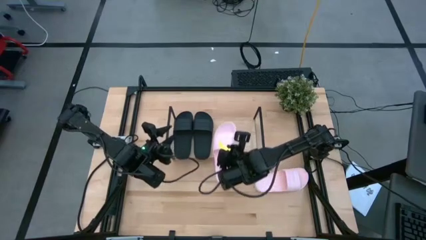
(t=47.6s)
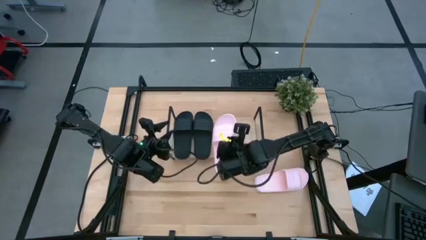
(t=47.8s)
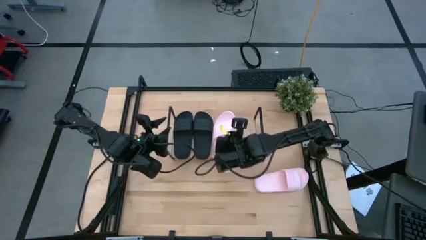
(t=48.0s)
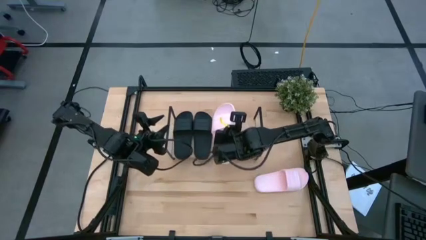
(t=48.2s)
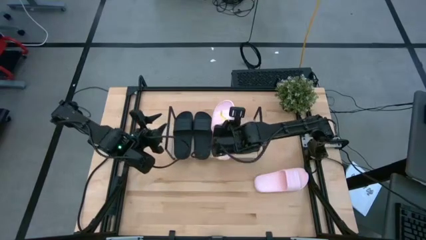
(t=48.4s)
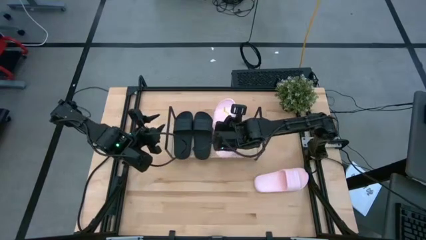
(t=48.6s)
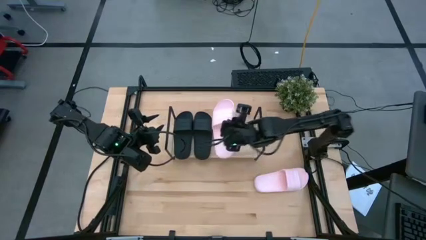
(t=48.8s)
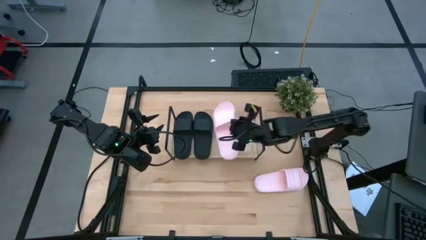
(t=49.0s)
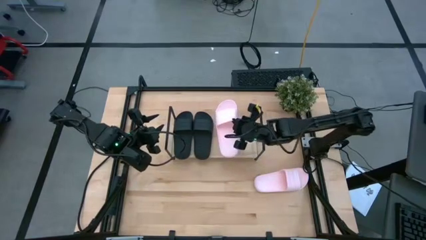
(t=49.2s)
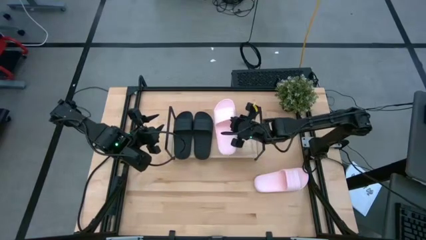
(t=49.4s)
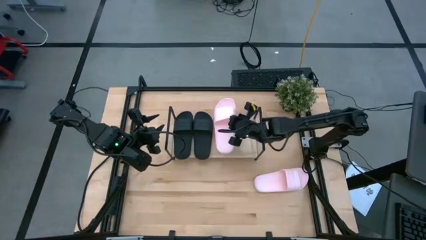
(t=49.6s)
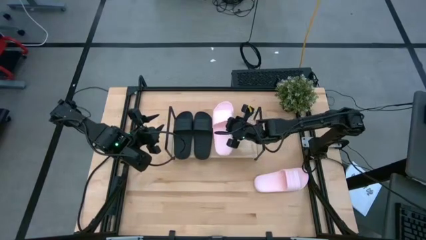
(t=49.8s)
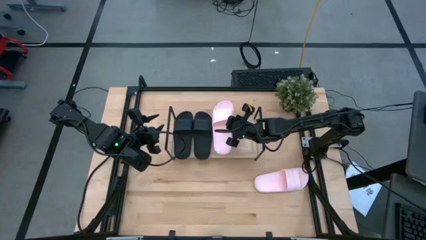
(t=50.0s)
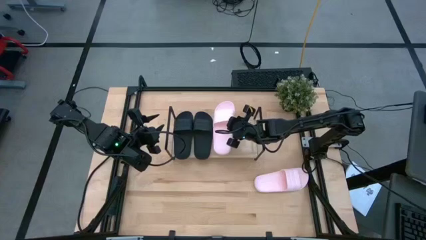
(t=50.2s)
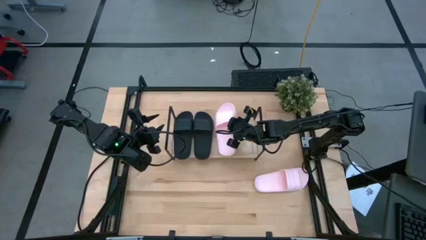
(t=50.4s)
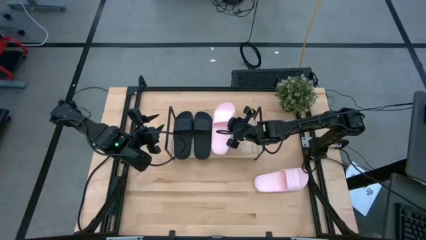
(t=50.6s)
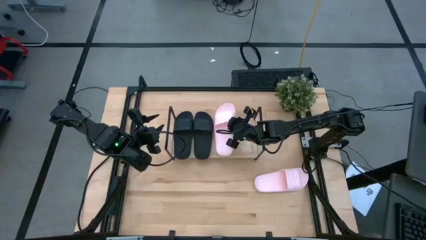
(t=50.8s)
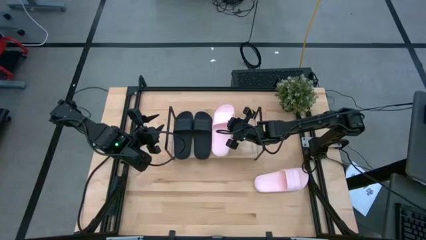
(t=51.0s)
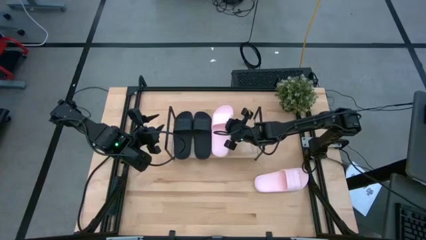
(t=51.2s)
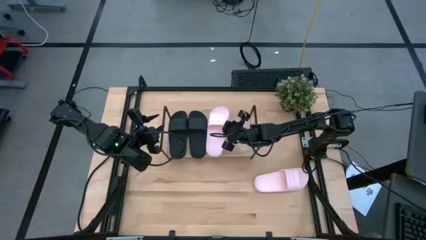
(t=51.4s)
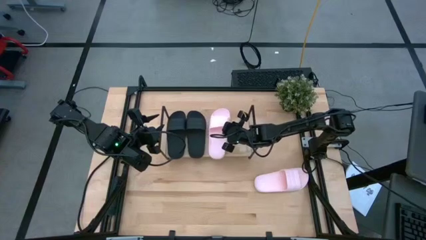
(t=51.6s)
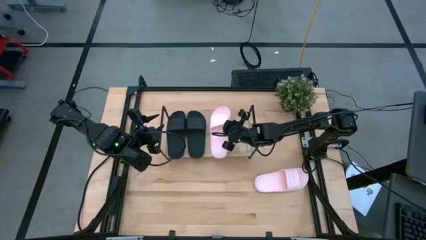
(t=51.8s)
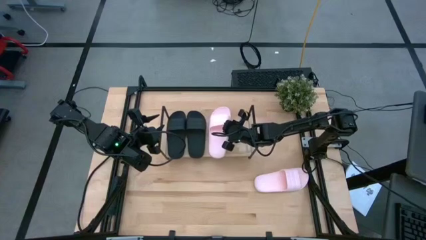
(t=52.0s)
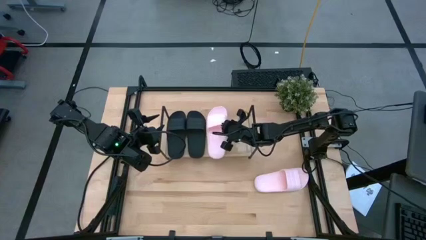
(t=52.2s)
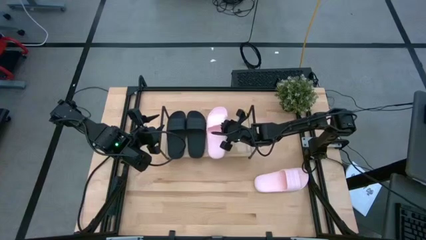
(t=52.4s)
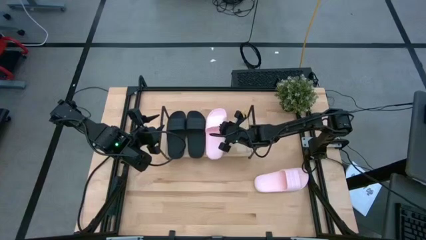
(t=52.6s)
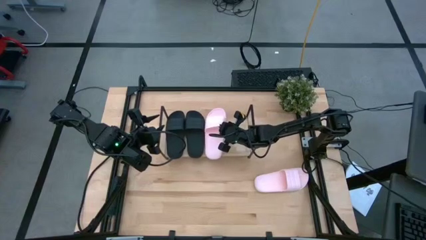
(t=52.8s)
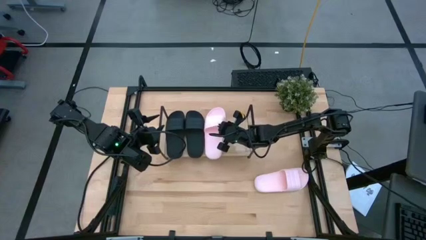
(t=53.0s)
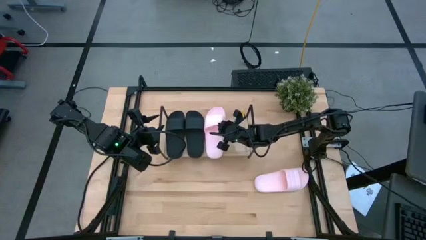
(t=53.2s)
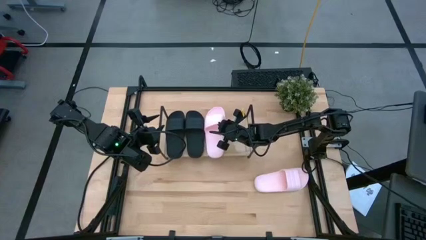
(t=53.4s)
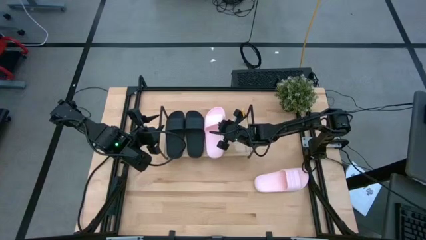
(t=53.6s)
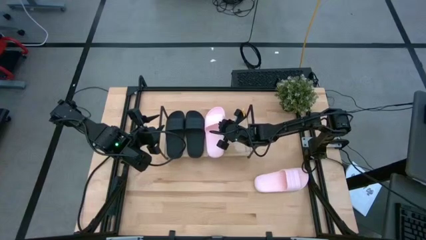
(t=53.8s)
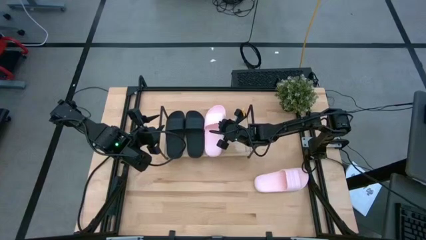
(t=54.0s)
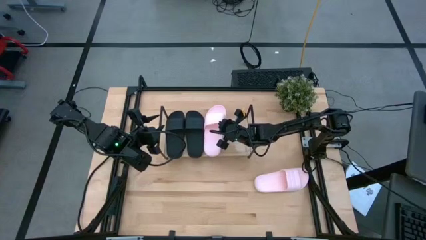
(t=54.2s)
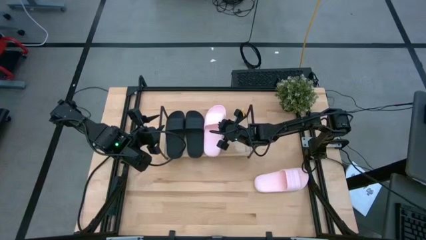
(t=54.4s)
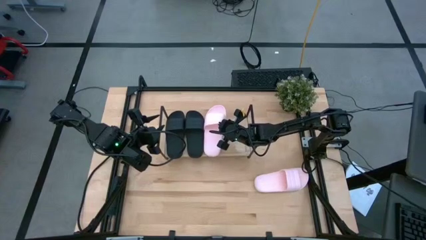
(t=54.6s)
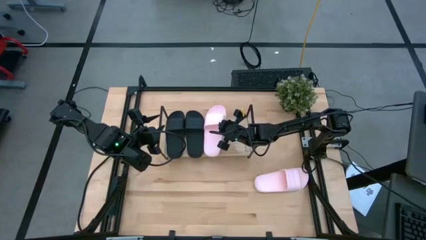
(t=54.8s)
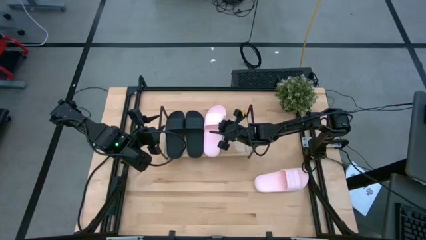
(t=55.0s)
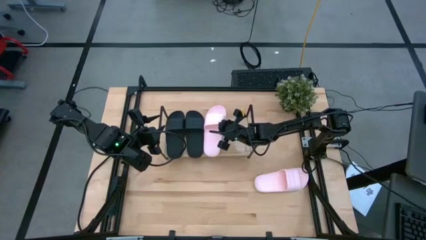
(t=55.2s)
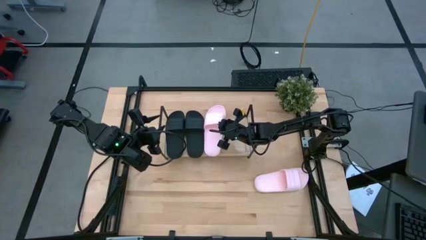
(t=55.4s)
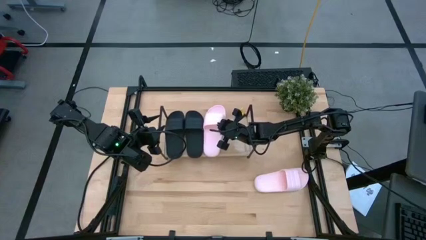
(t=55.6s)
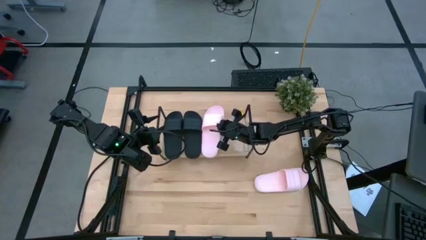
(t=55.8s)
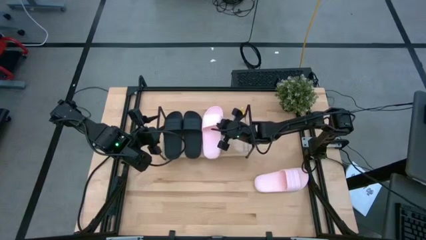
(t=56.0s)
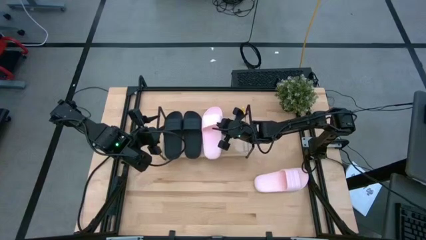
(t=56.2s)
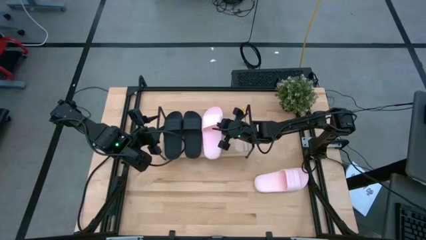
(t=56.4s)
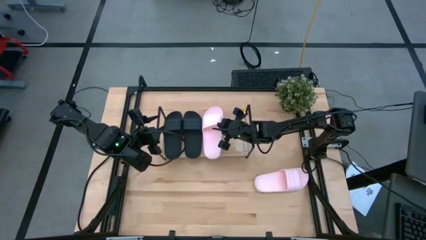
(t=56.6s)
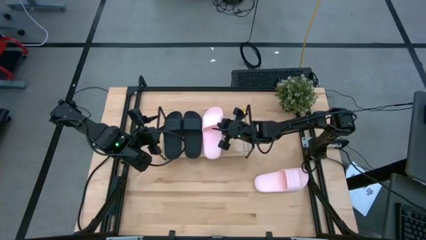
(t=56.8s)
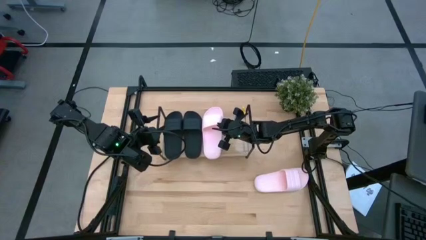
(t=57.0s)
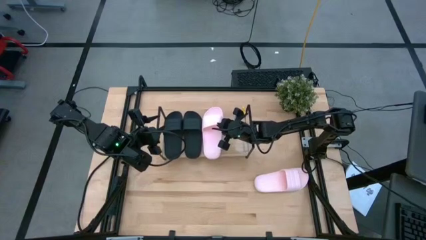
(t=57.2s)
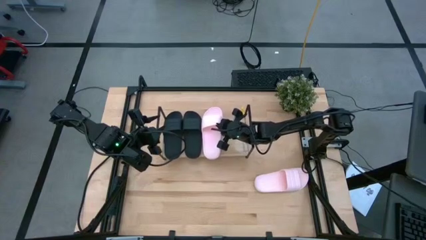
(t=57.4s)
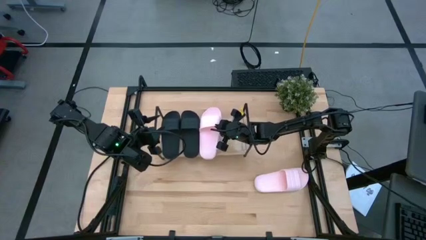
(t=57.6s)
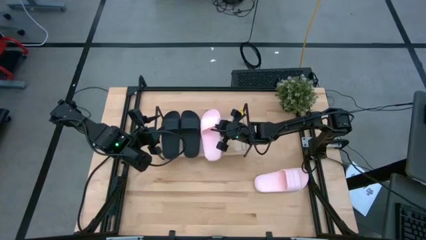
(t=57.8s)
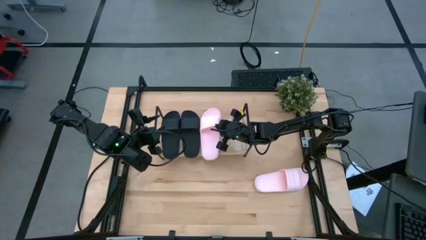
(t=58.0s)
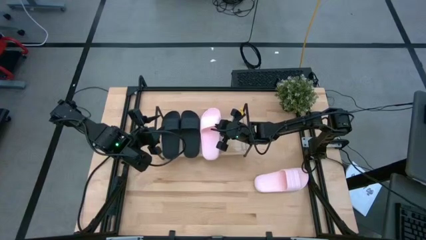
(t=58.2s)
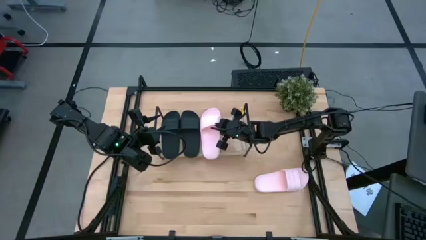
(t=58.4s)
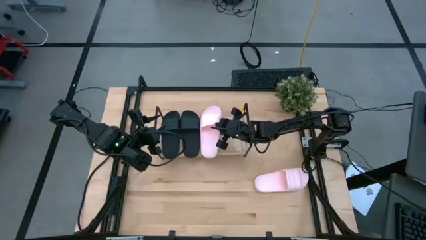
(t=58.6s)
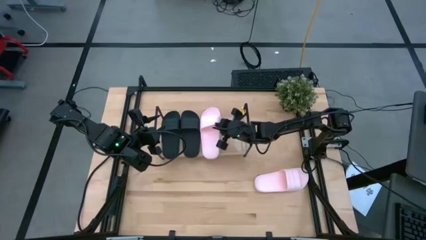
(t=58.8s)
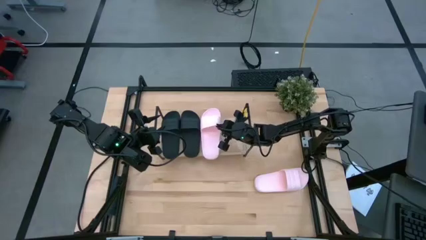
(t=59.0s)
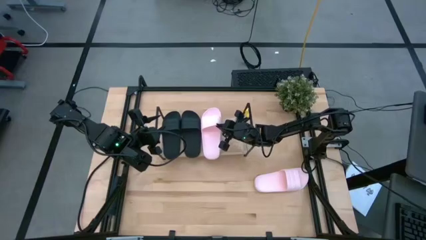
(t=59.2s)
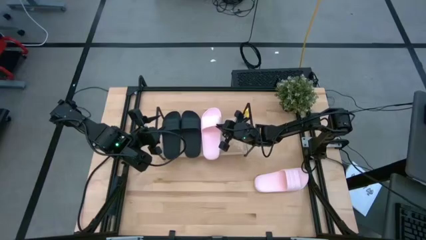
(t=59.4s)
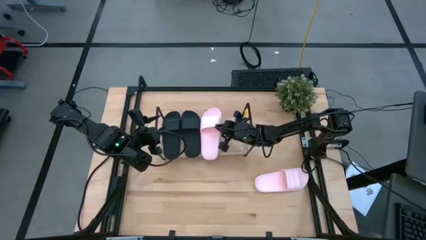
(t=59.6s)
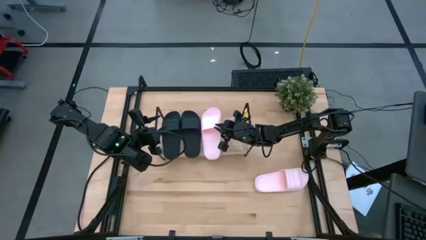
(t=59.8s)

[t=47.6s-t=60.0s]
Task: Pick and place slides into the shelf
Put the left pink slipper on the shelf
